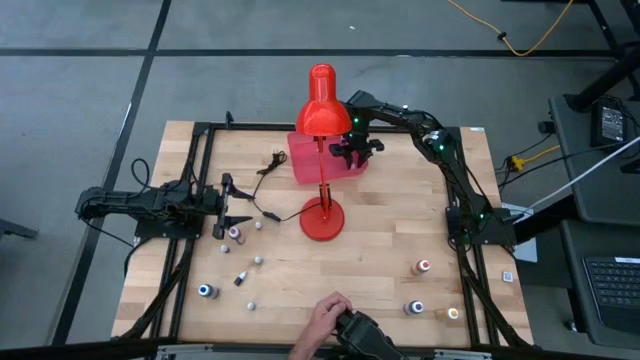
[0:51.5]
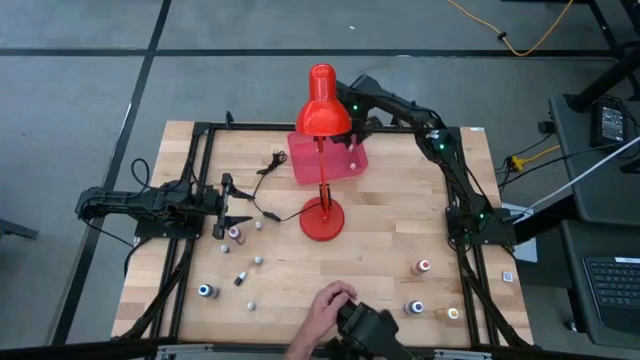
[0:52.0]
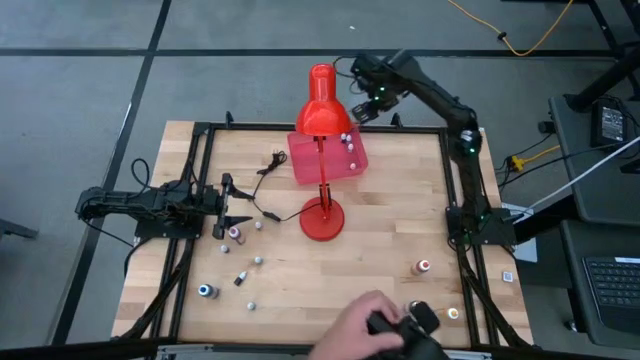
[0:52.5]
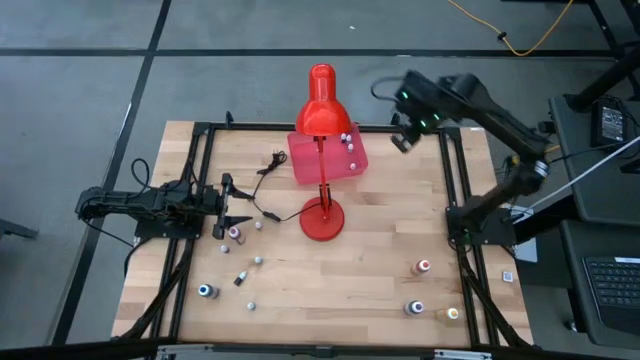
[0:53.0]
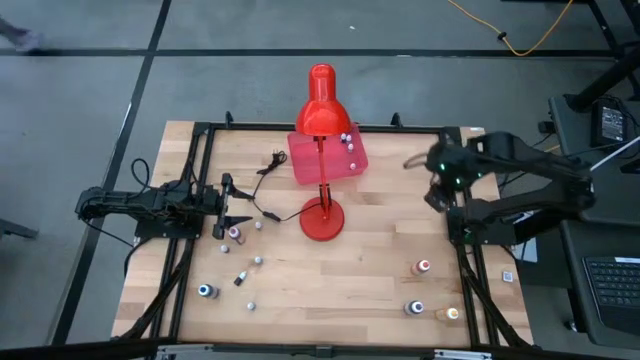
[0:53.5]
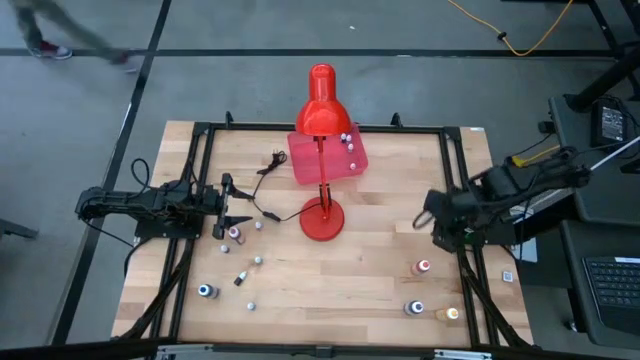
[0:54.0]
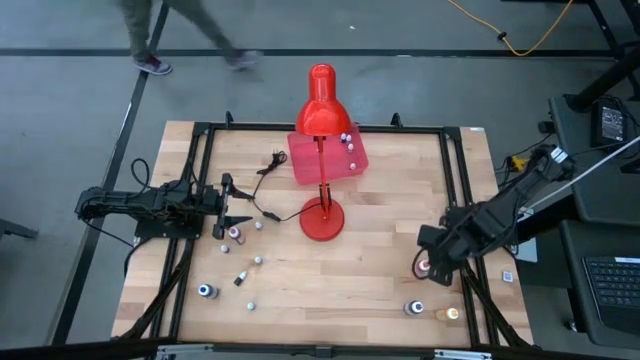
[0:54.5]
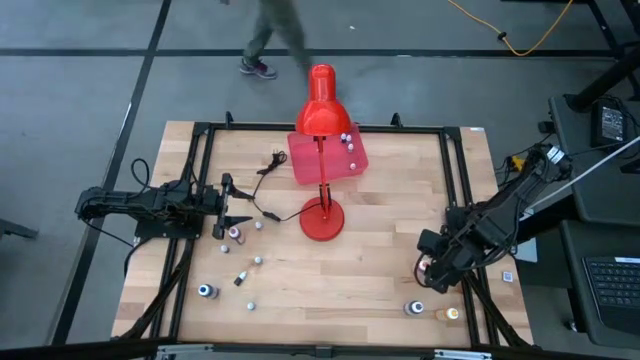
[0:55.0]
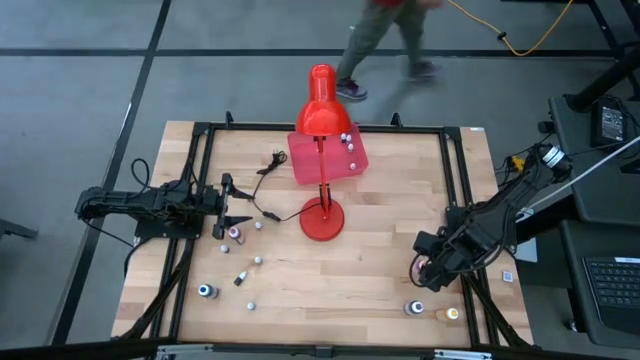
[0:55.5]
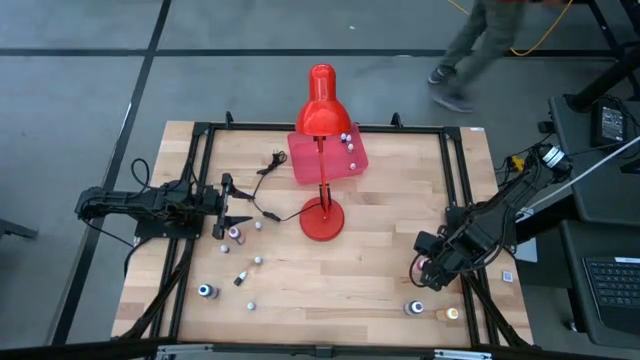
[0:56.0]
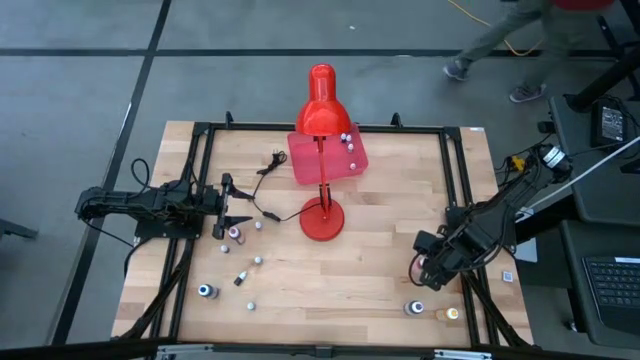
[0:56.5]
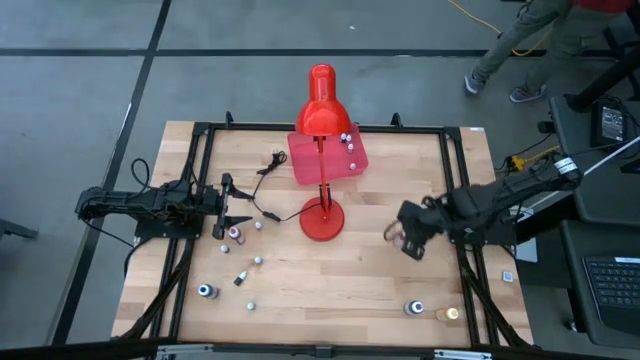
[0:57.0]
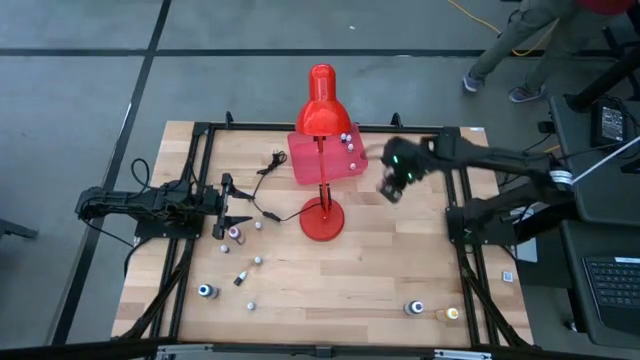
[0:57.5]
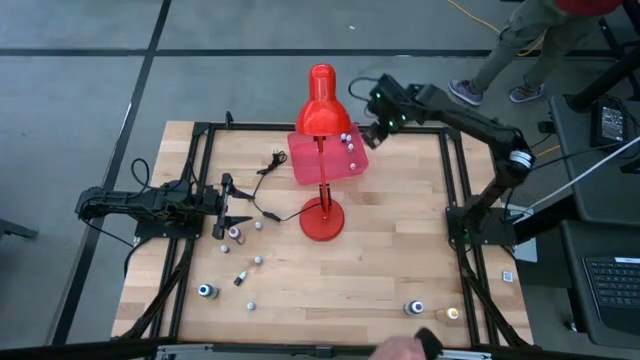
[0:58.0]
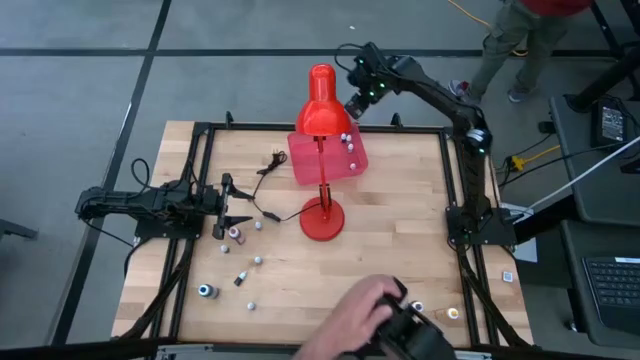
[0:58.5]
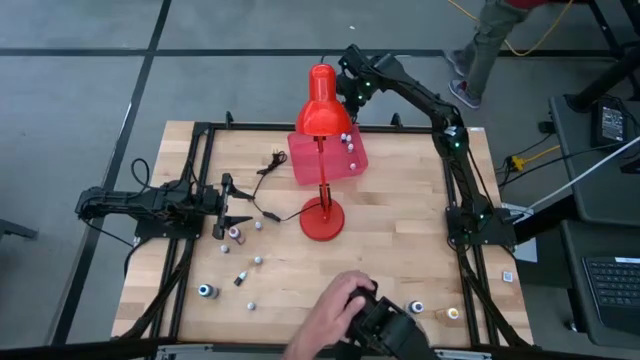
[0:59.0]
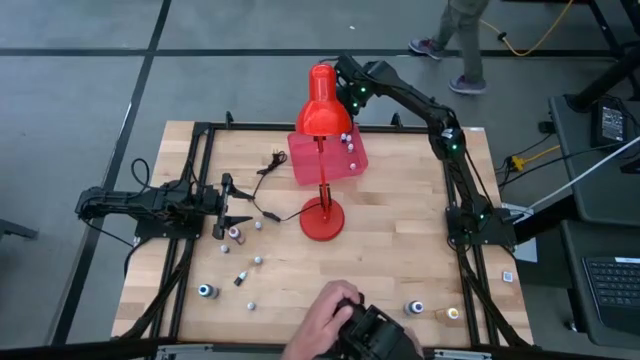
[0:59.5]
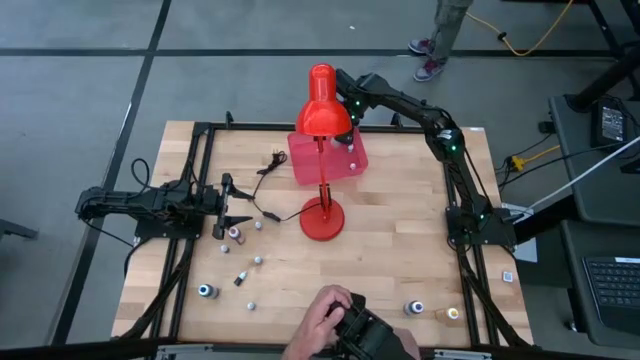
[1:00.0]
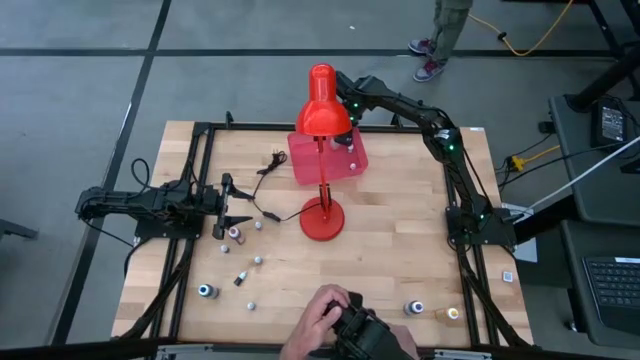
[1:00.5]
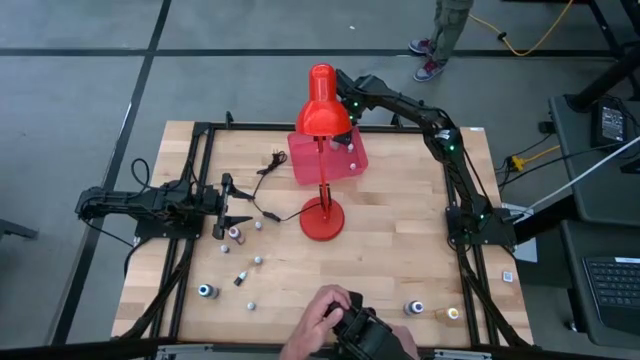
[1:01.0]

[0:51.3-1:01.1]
Task: Pick & Place food coloring
Put the large orange food coloring bottle into the red bin

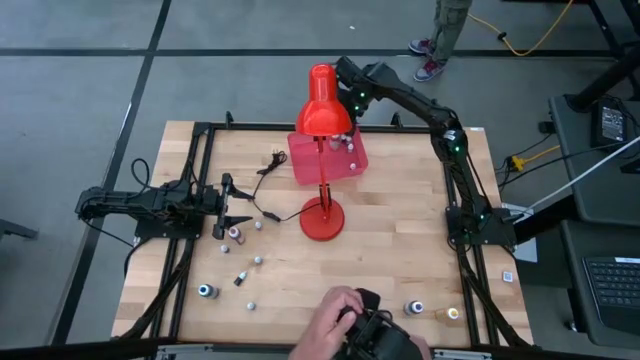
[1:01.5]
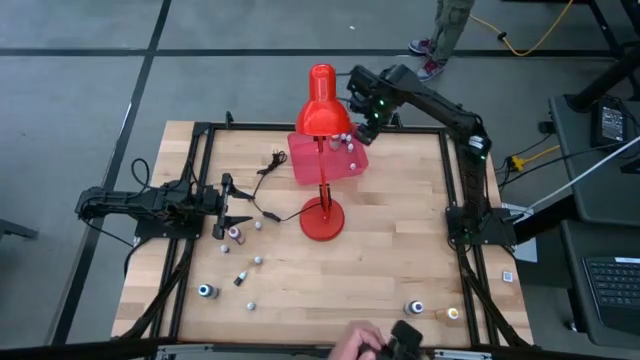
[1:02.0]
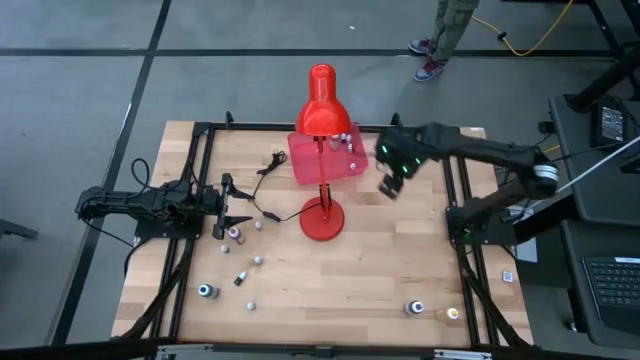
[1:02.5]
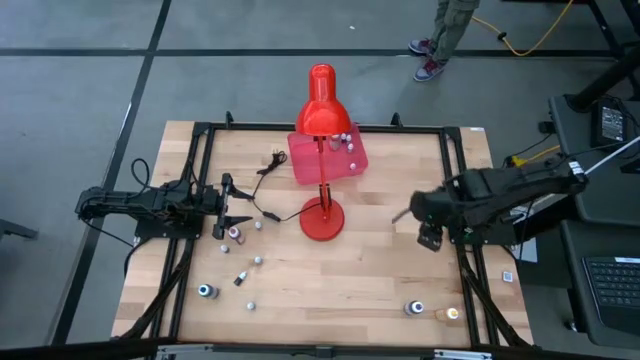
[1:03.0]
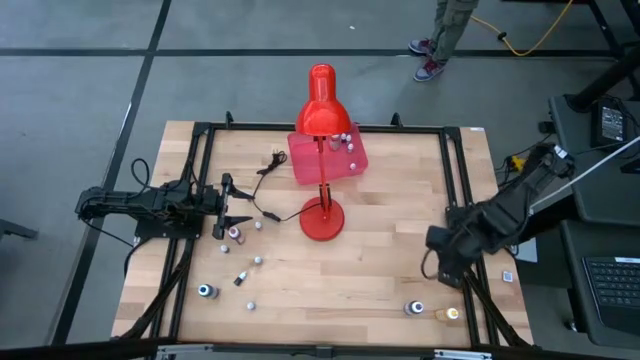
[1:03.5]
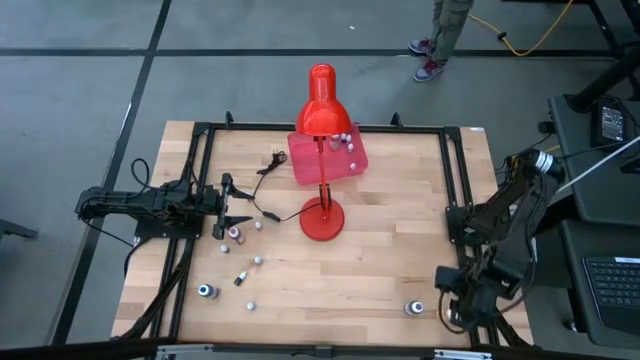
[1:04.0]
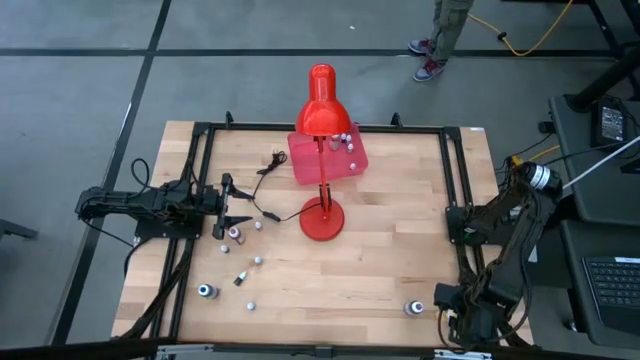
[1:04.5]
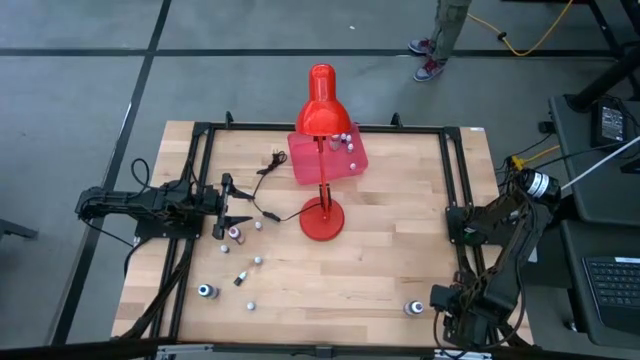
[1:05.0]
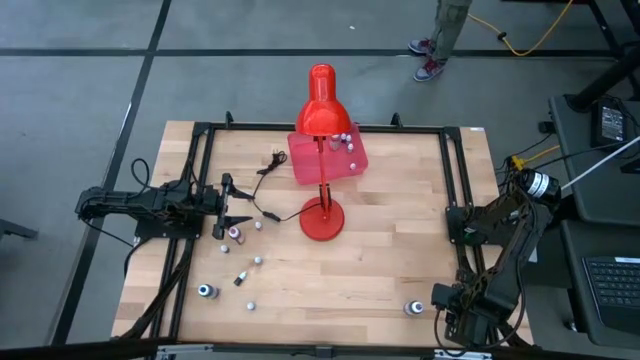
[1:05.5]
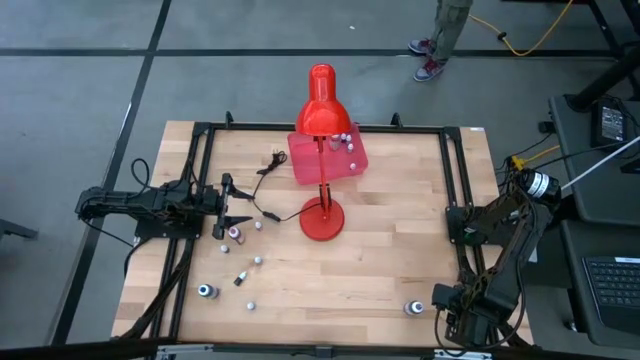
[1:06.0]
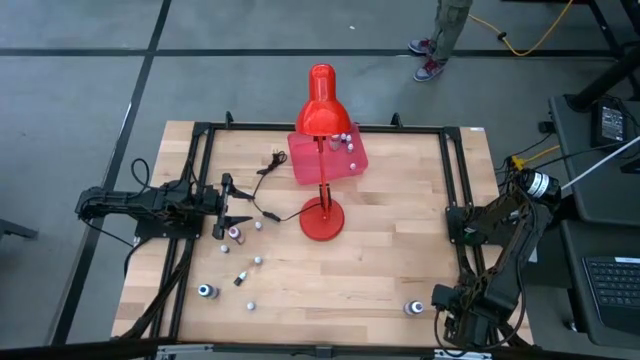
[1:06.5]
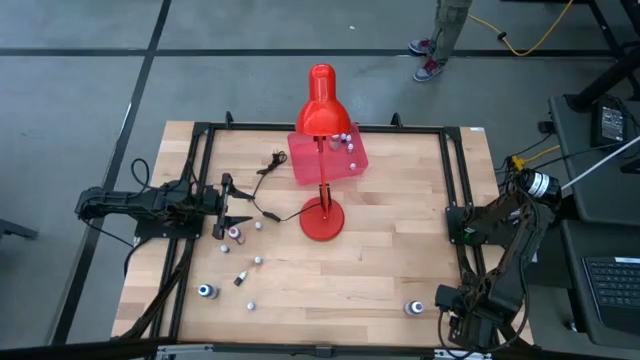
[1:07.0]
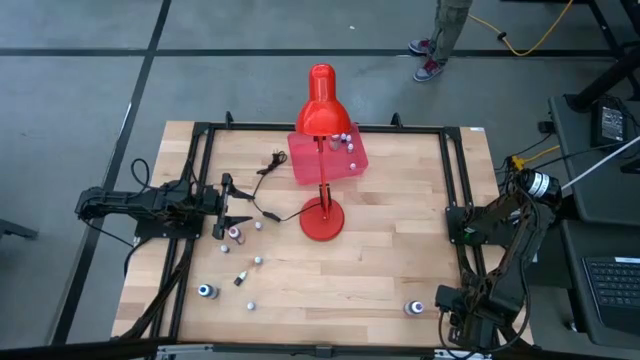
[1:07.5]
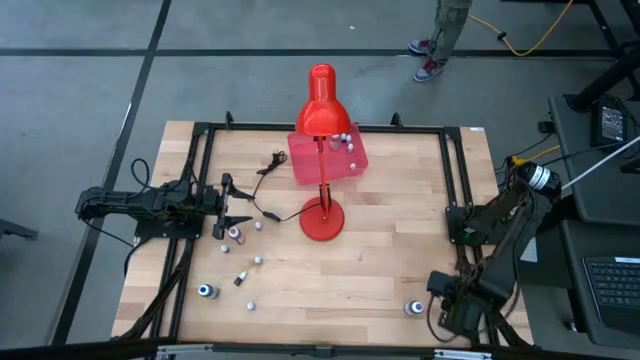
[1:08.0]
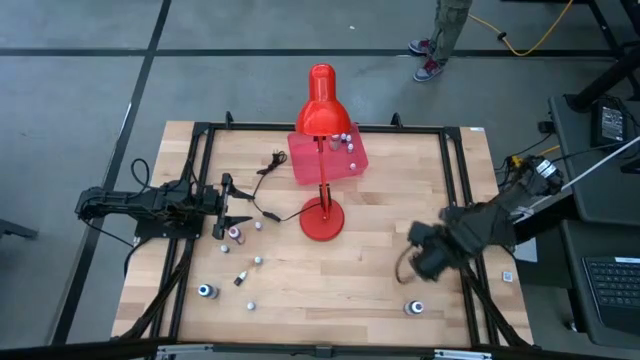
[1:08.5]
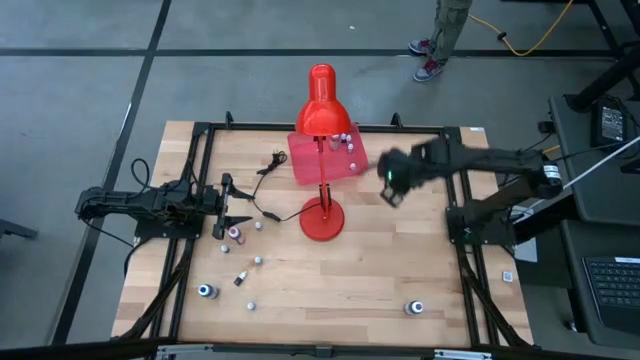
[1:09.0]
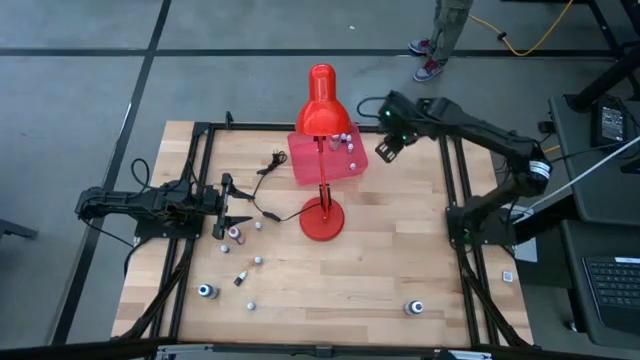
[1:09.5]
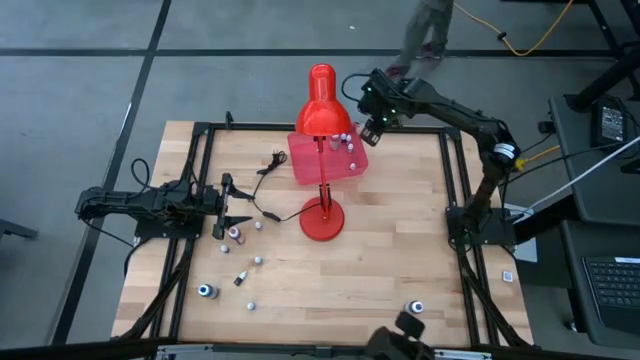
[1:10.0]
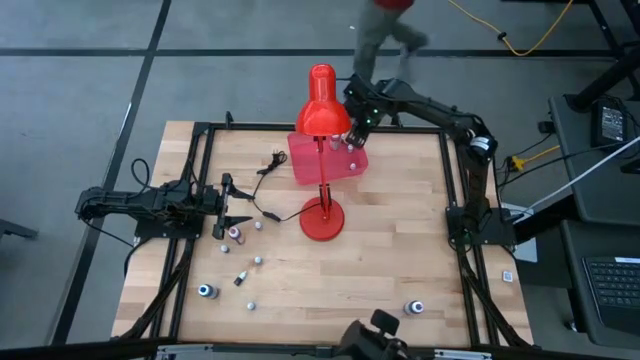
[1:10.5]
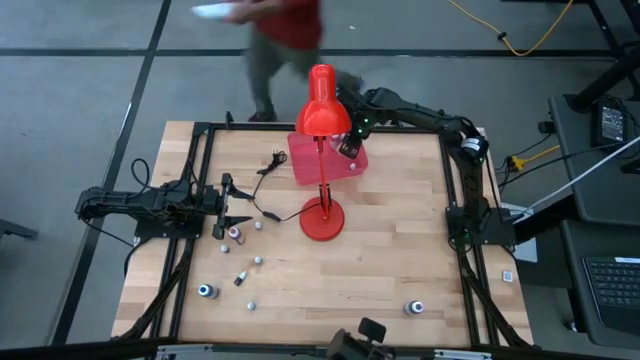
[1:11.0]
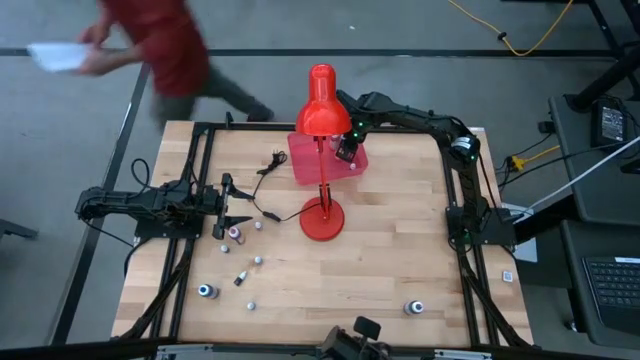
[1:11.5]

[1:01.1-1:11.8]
Put the large yellow food coloring bottle into the red bin

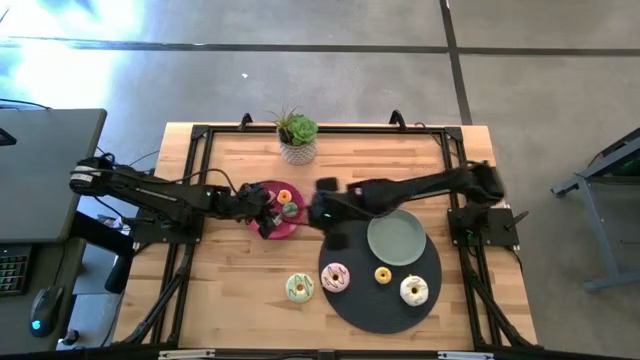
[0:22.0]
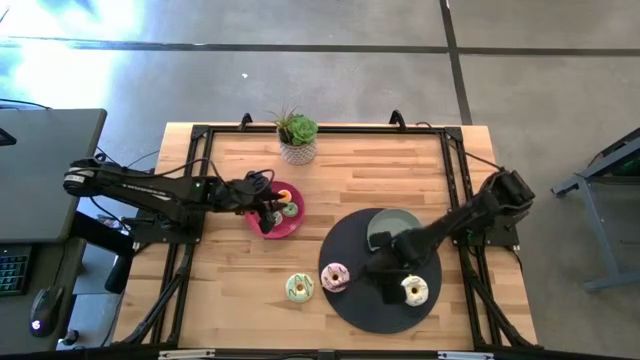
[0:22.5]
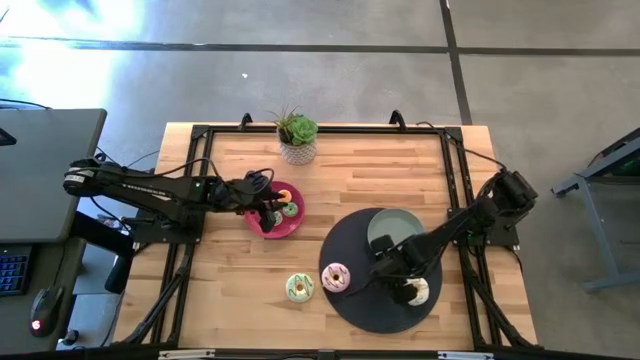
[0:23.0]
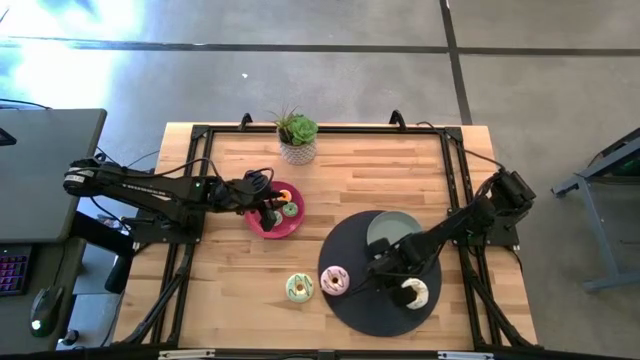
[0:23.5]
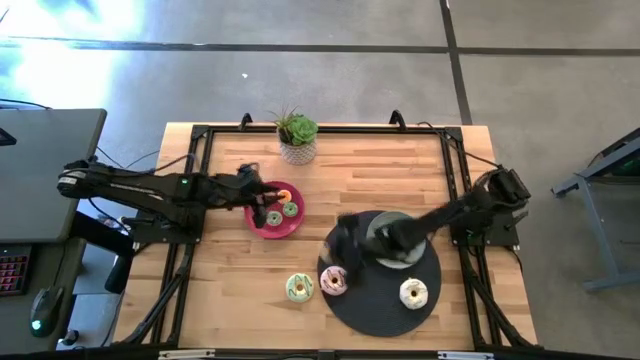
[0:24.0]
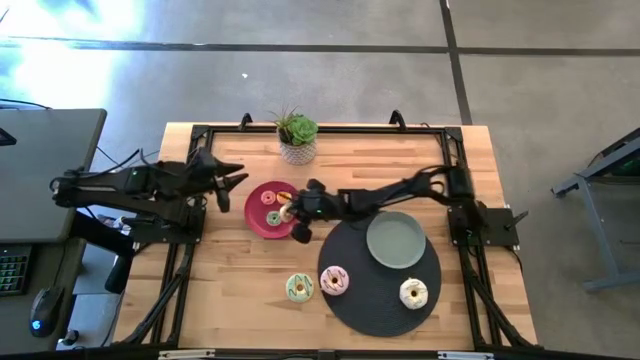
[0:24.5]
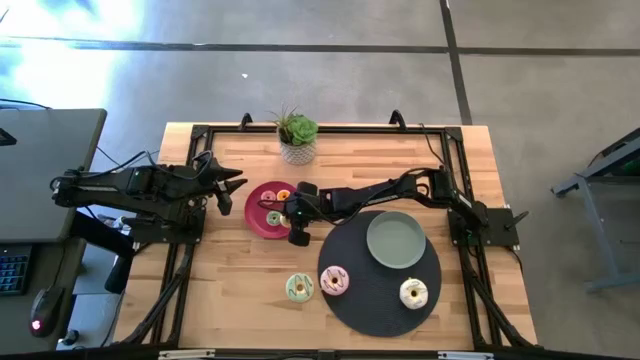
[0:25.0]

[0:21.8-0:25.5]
Task: Pick & Place donuts
Put the small yellow donut on the pink plate
